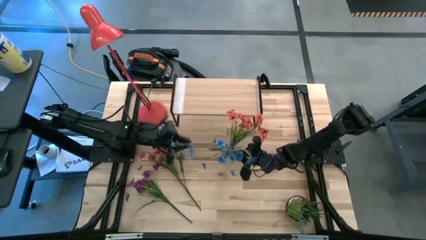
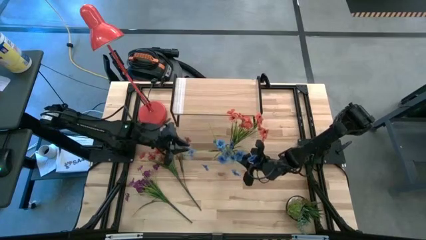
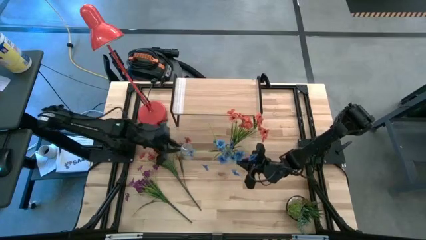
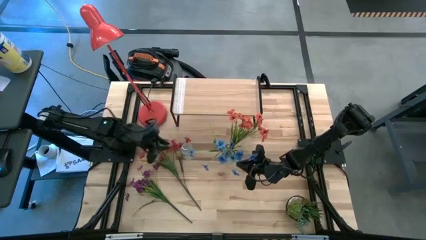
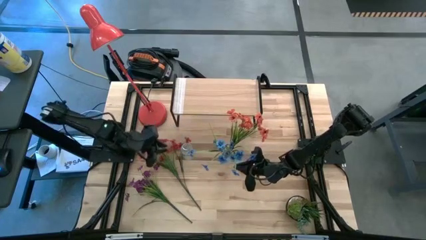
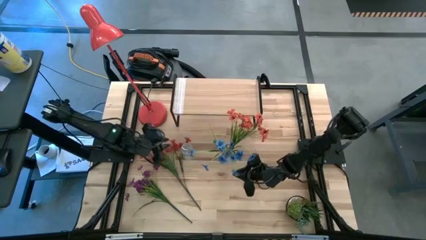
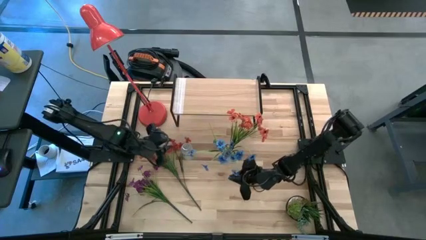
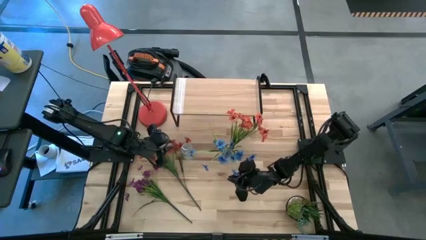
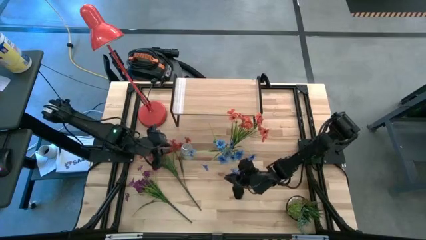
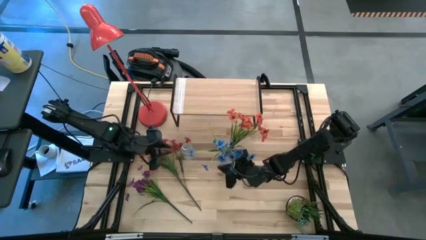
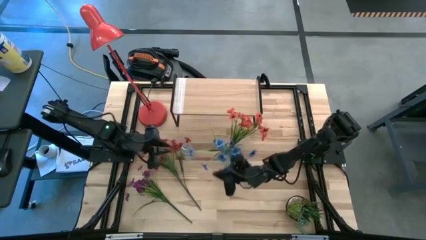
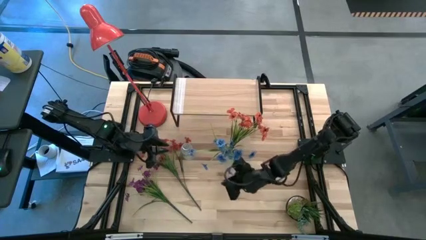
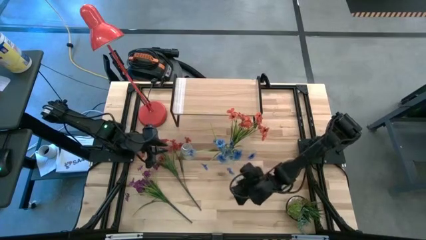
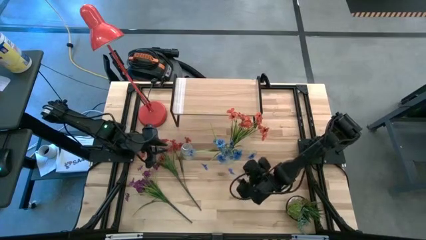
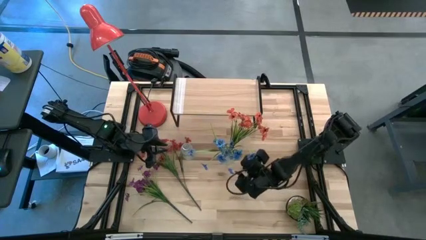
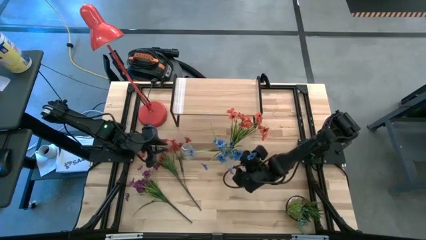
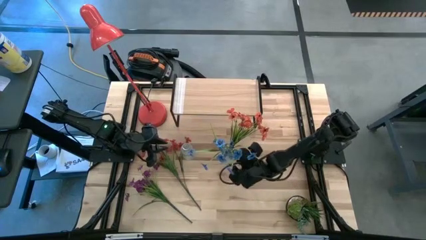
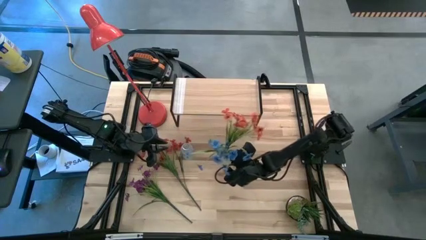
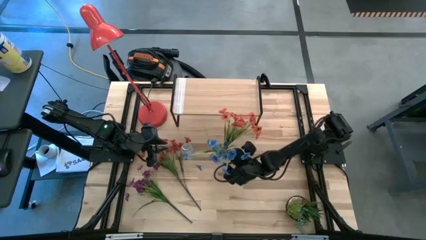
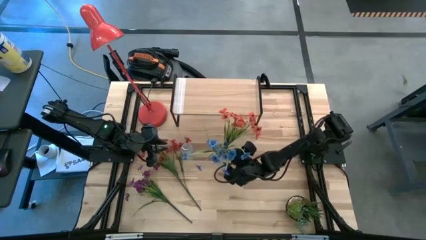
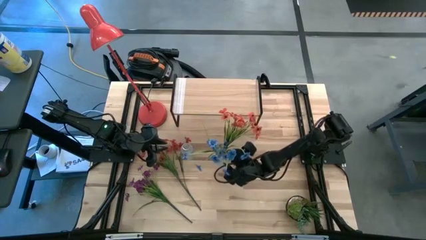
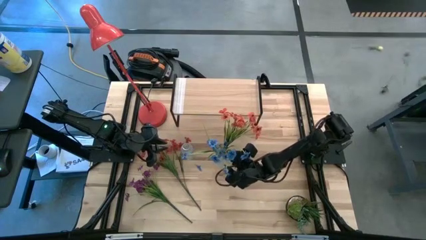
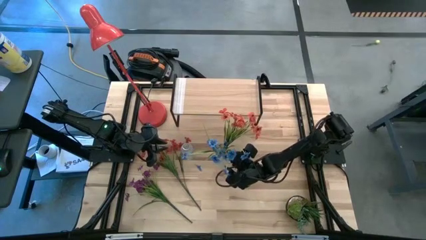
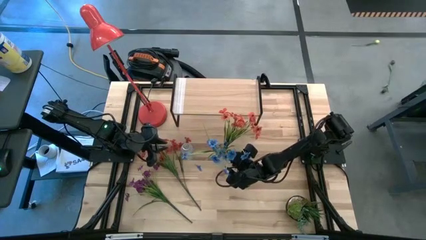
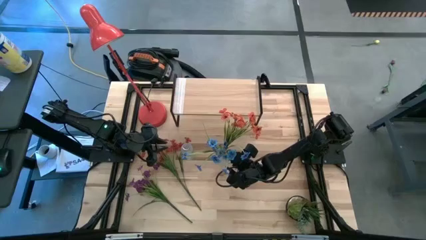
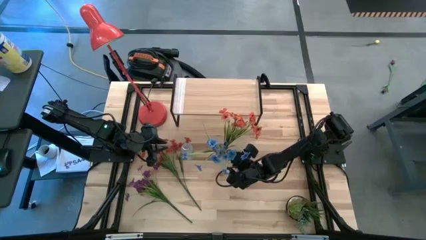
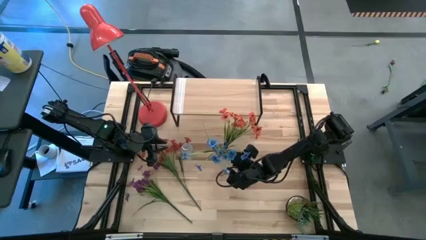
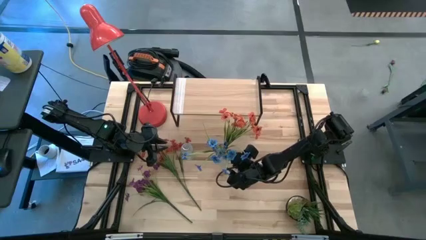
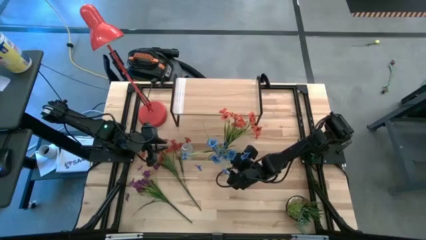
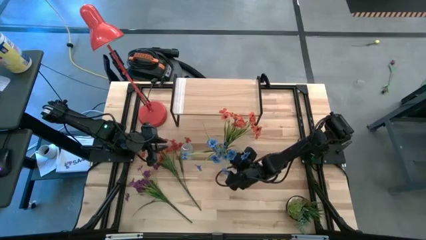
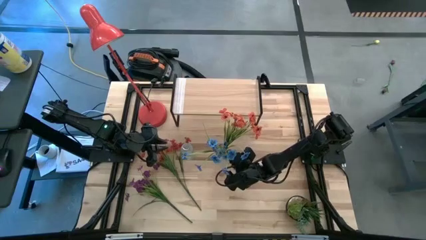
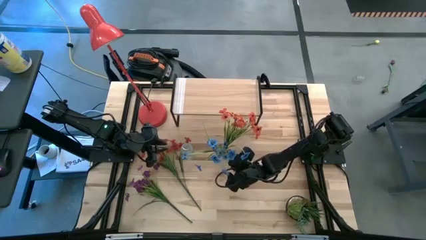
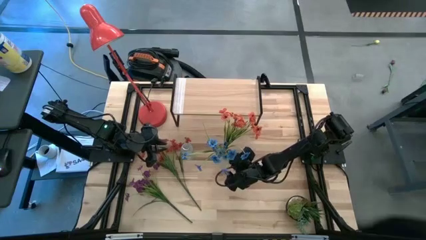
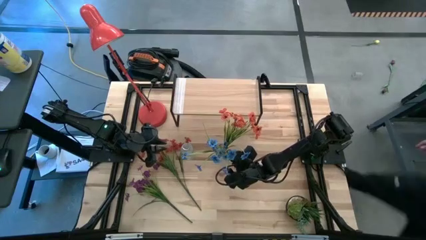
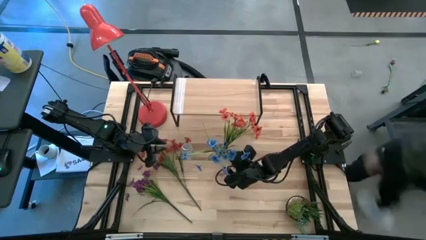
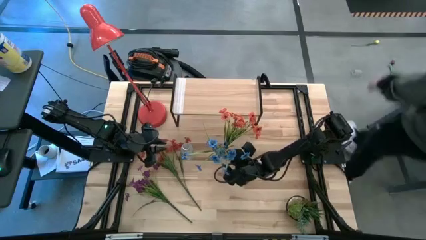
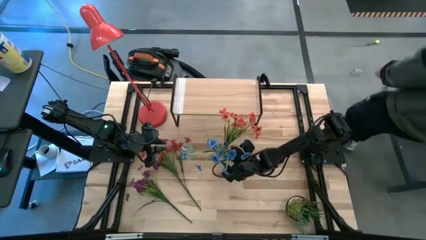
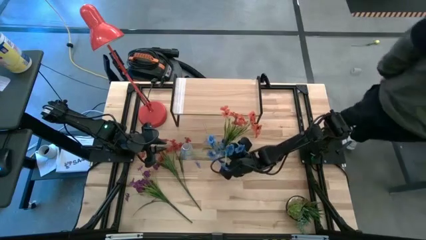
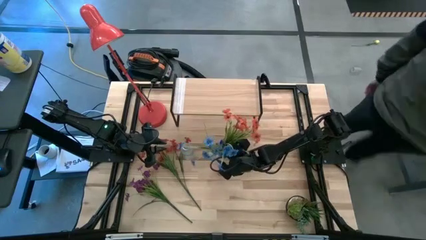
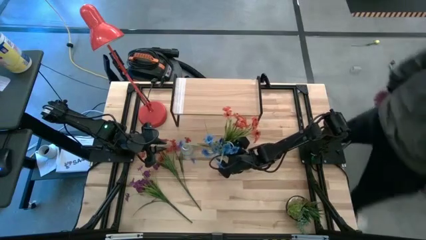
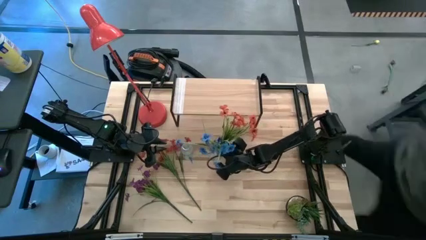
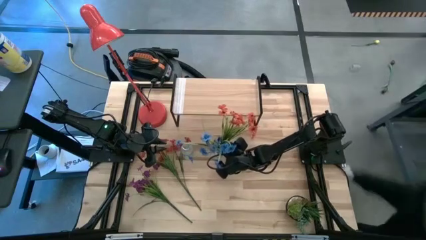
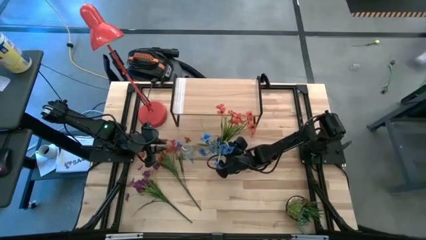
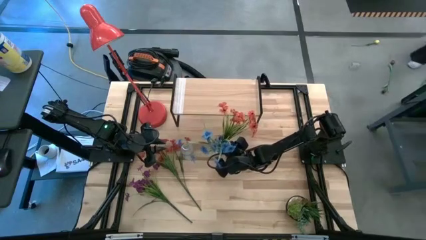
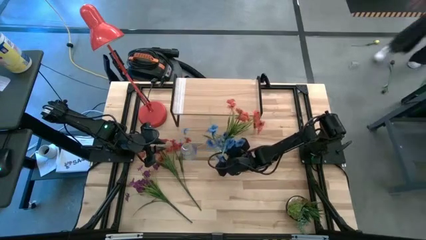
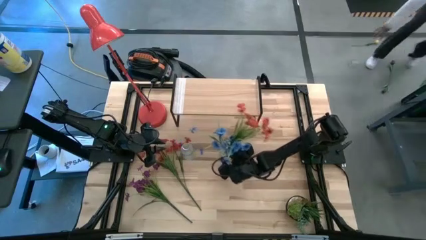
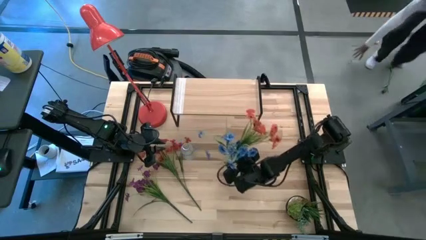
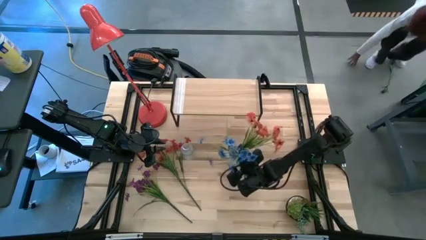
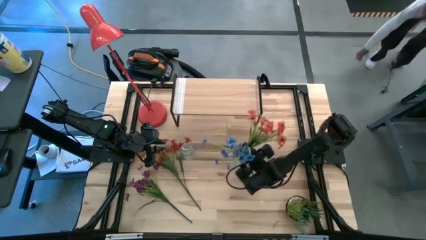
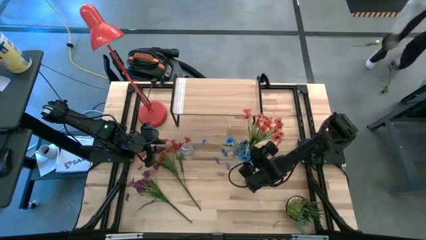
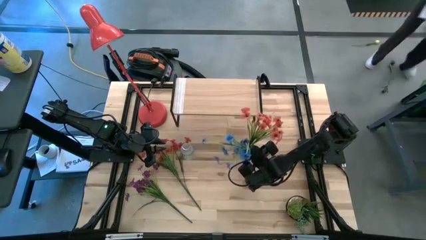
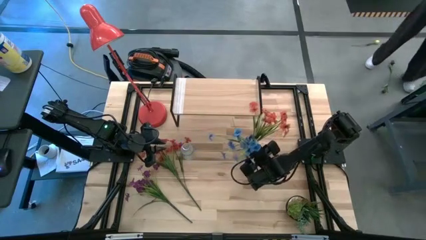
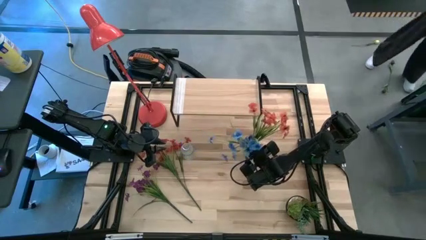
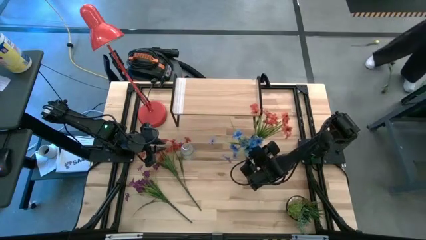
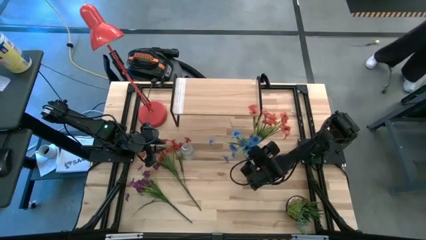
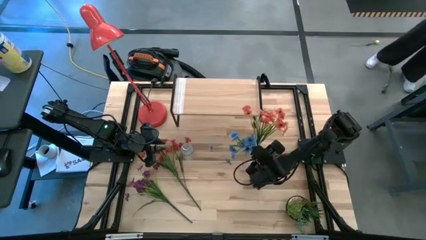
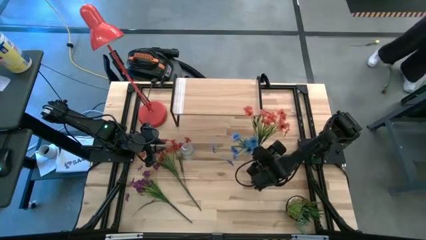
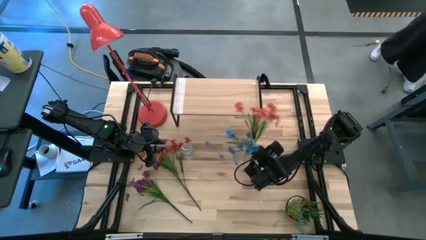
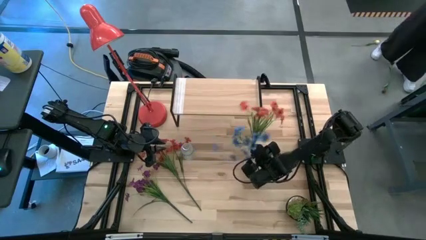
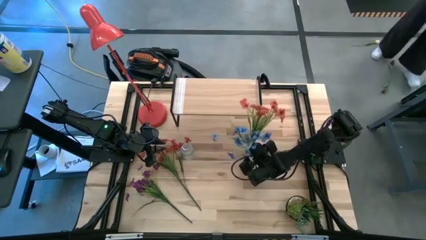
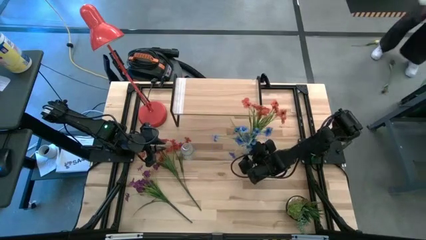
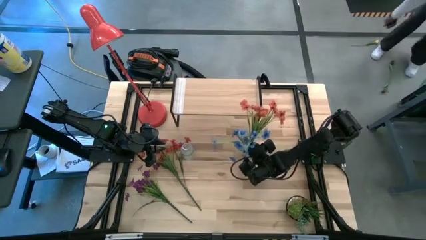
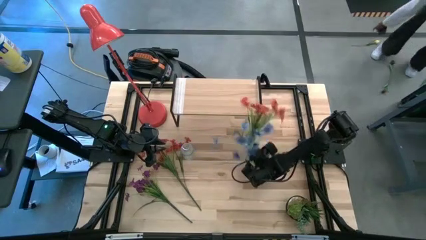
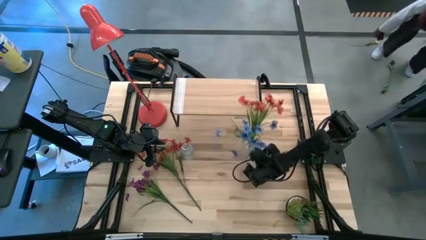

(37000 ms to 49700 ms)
Task: Pick and place flowers into a vace then onto a shelf
Adjust the right transparent flower vase
